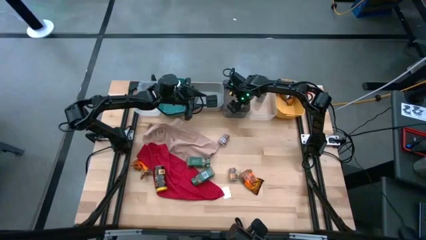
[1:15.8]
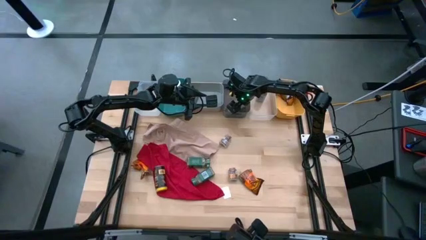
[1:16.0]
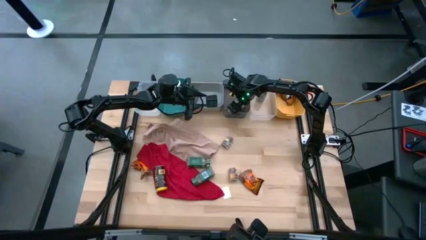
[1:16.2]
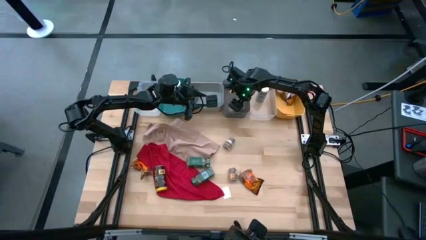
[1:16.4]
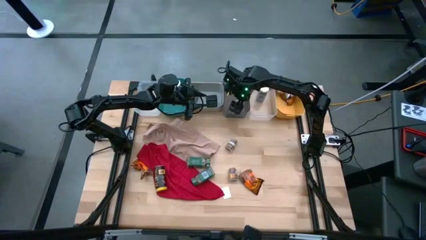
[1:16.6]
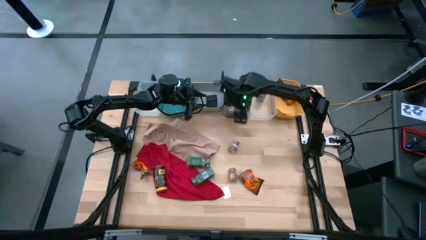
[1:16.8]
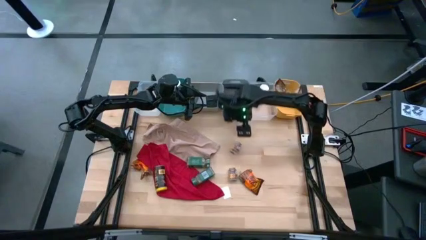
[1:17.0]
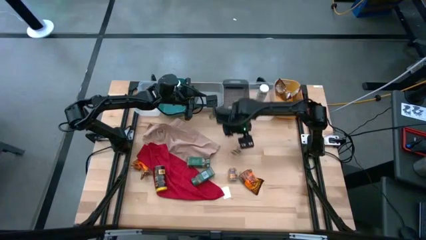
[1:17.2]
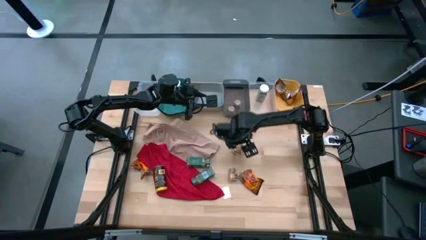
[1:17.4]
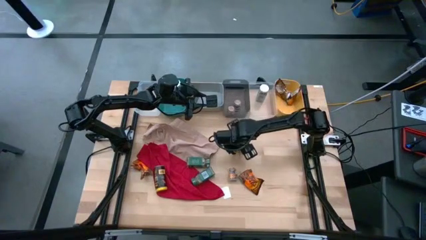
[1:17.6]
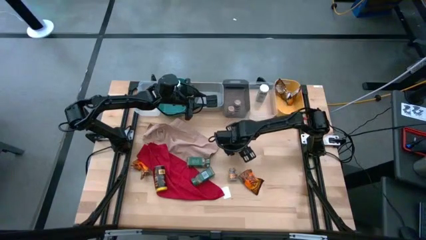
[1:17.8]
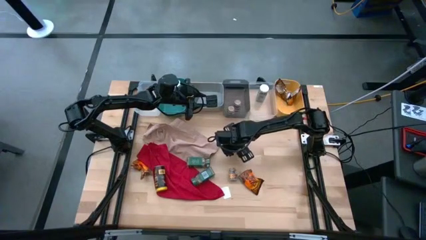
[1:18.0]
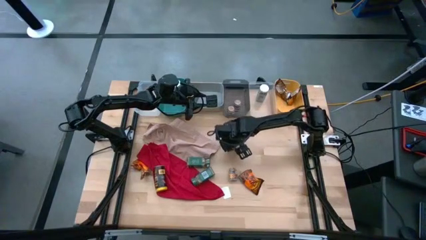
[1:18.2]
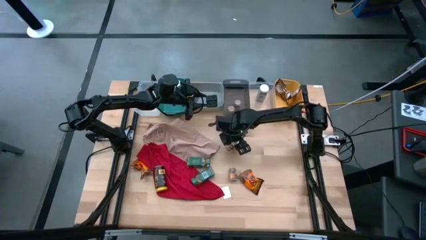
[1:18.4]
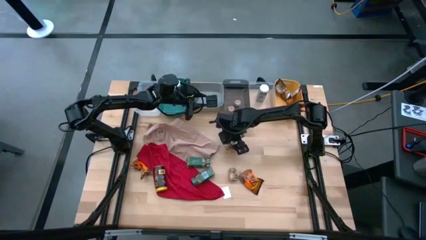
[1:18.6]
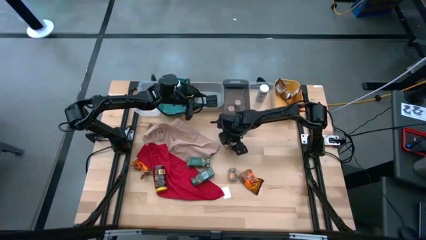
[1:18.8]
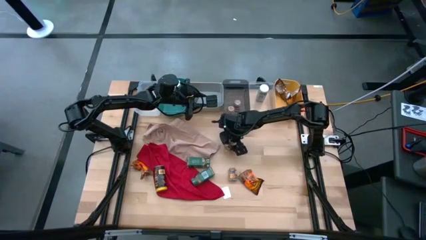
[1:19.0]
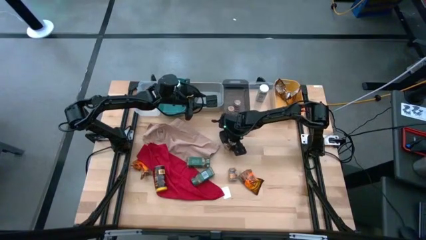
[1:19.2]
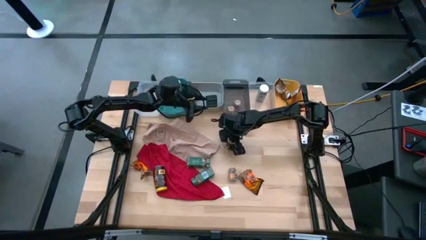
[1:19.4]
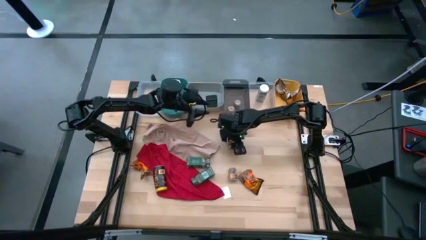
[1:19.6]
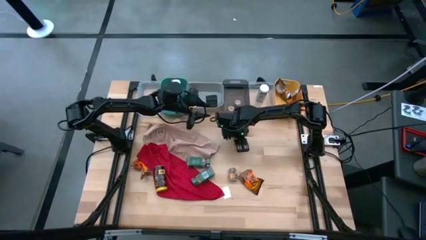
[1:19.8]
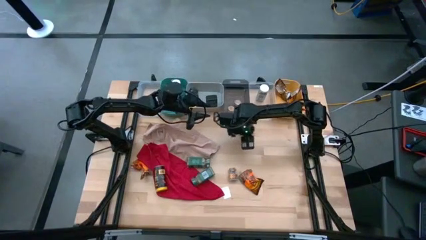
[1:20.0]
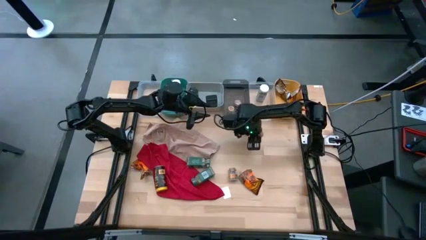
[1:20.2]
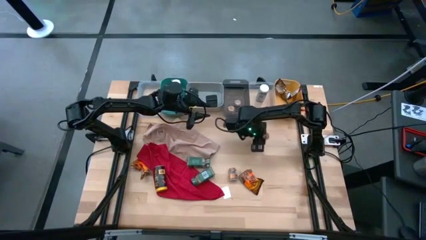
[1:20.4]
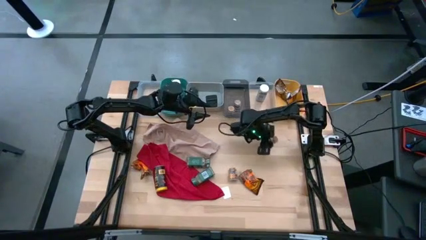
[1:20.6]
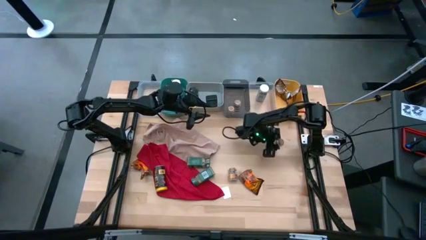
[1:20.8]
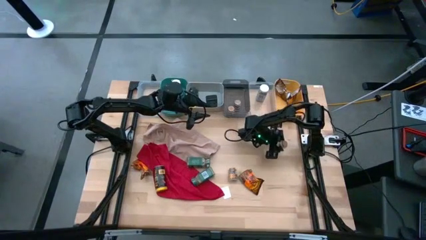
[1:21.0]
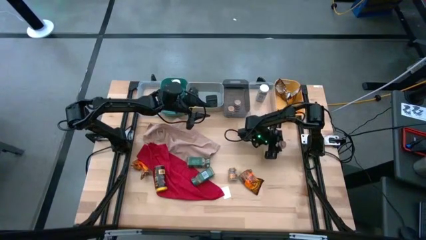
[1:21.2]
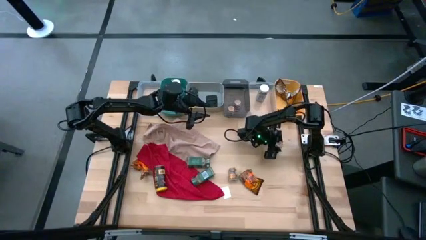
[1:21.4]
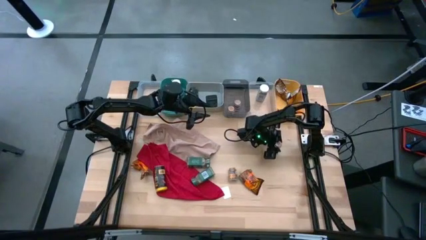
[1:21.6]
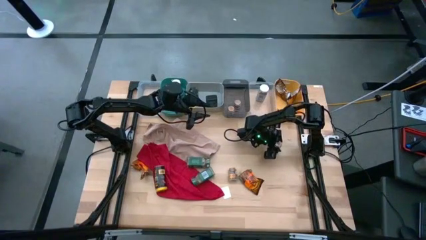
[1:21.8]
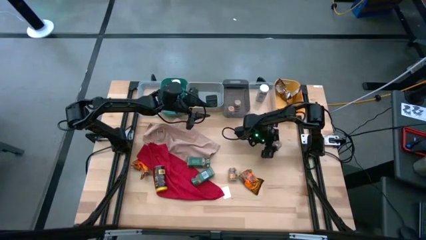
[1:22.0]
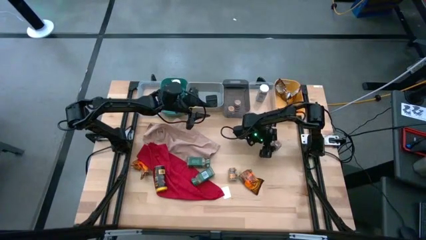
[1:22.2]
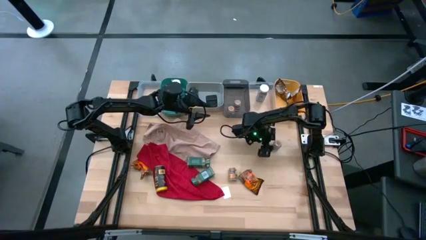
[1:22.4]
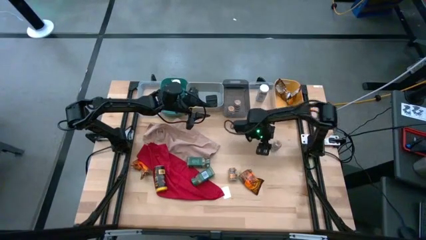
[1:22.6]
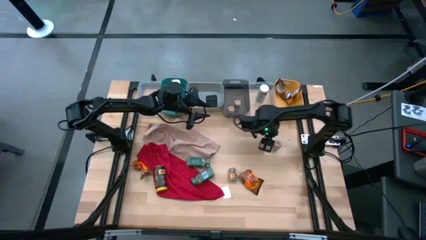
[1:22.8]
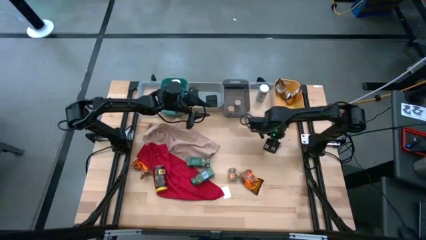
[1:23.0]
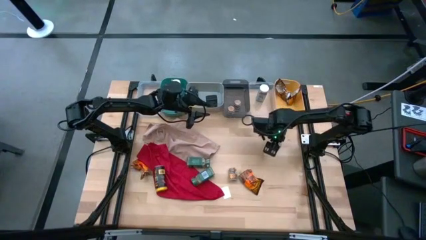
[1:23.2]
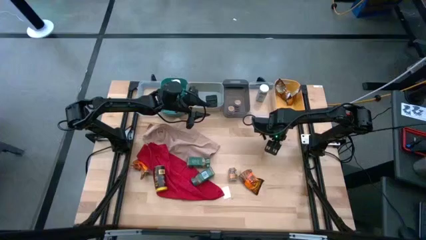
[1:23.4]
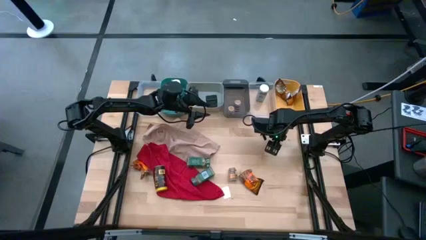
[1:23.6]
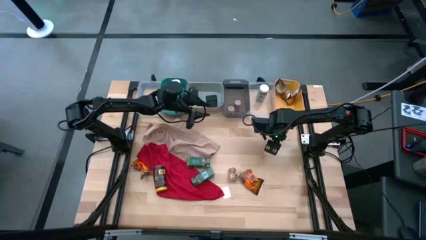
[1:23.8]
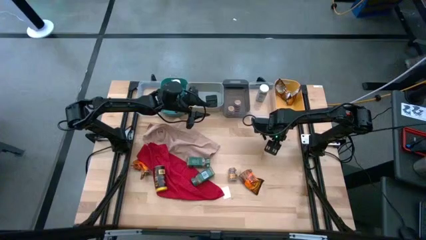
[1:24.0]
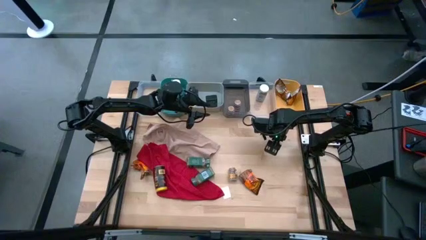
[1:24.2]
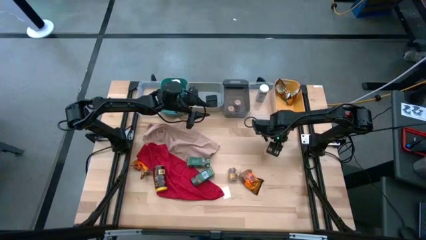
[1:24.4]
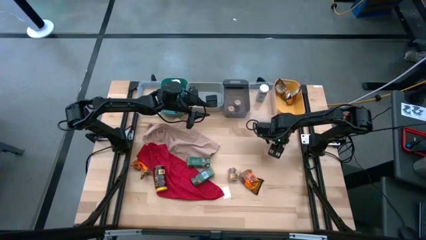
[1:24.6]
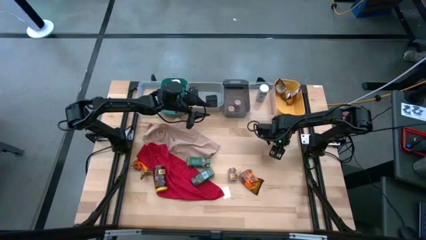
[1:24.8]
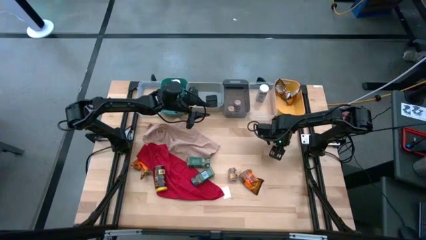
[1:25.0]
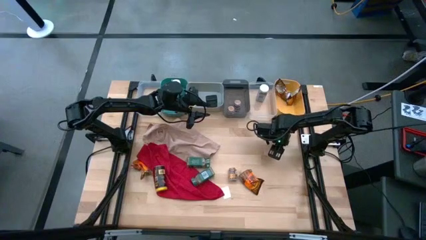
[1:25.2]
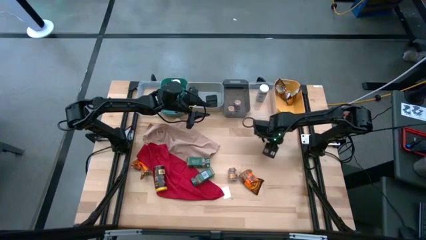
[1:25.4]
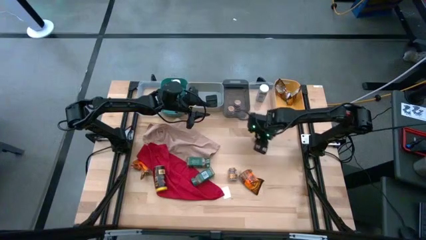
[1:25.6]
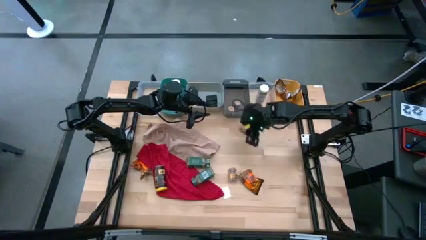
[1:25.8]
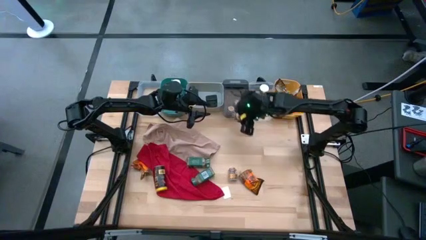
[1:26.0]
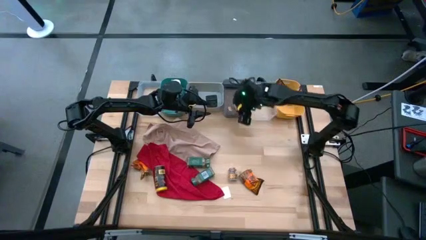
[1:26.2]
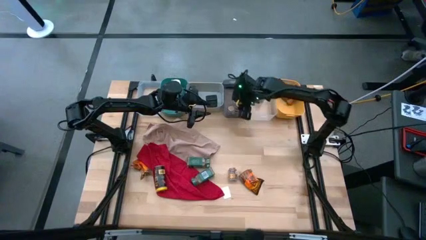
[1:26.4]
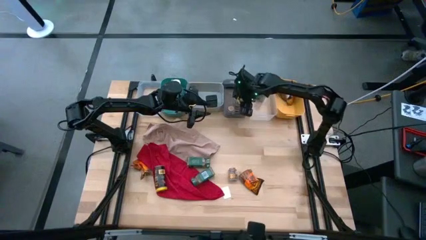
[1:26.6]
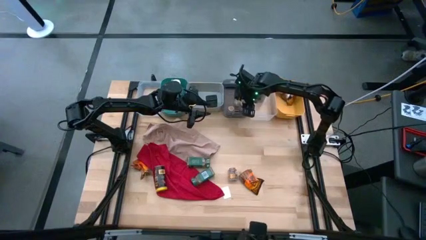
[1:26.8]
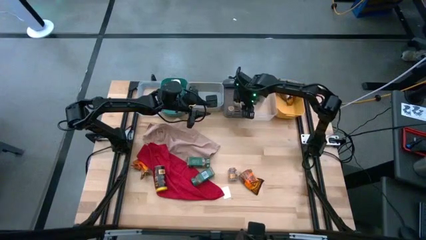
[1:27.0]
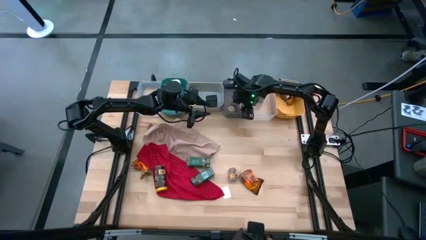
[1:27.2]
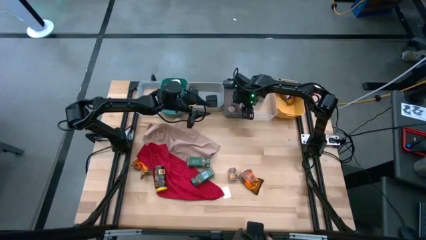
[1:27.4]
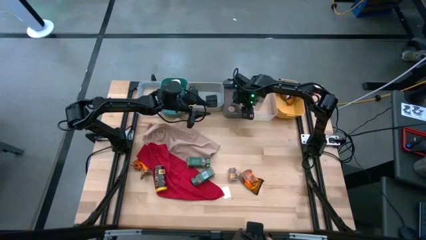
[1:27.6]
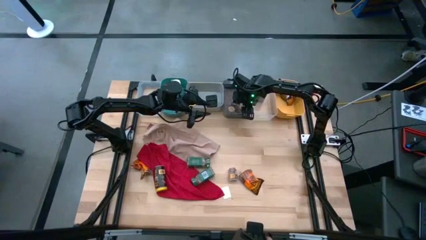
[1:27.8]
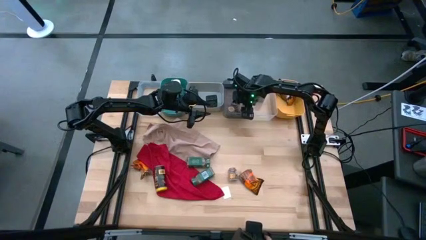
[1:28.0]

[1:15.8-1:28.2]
Task: Sort spices by type
Put the brown seasoning bottle into the black bin

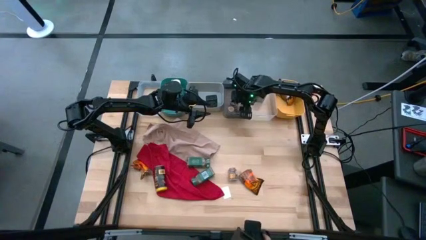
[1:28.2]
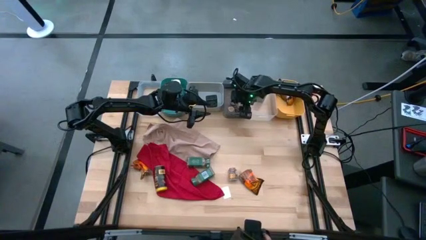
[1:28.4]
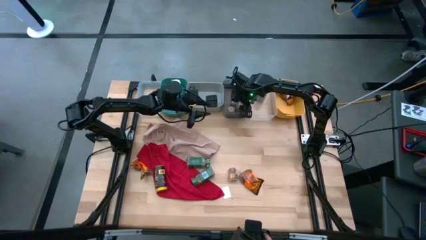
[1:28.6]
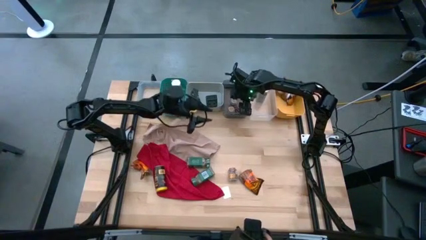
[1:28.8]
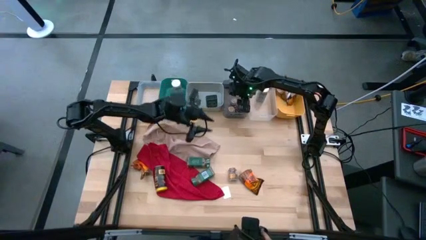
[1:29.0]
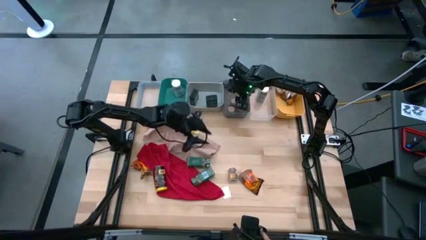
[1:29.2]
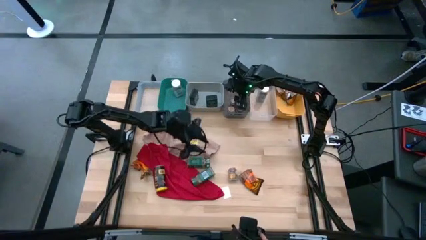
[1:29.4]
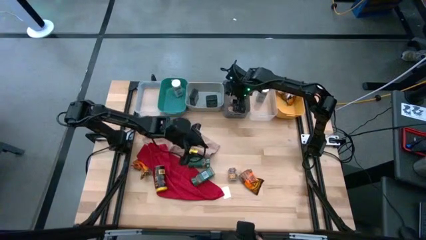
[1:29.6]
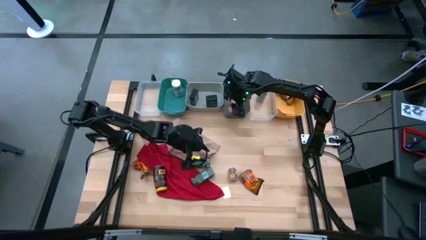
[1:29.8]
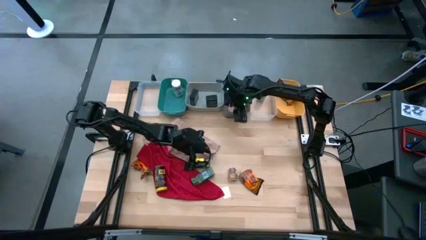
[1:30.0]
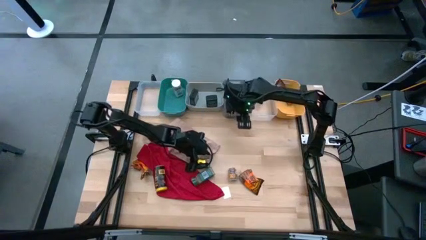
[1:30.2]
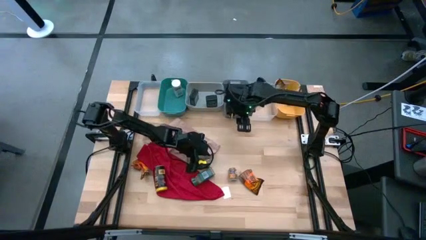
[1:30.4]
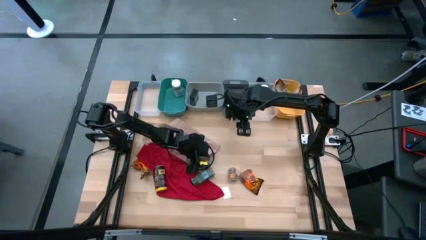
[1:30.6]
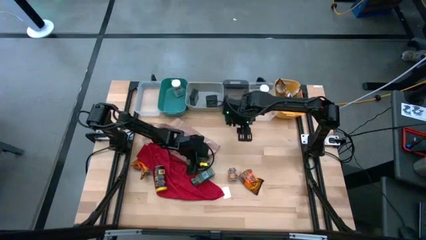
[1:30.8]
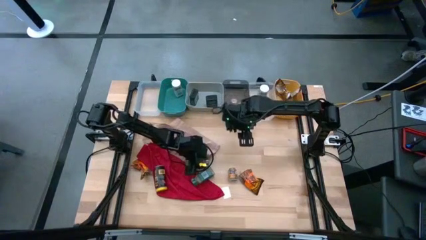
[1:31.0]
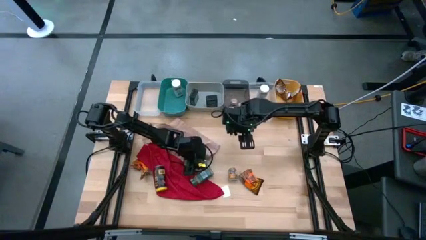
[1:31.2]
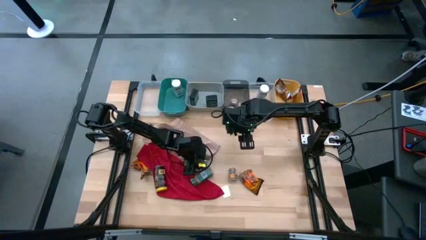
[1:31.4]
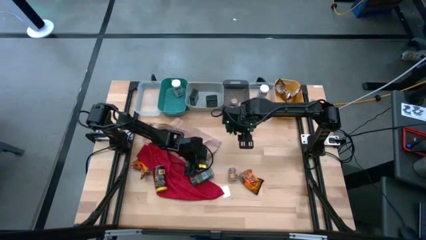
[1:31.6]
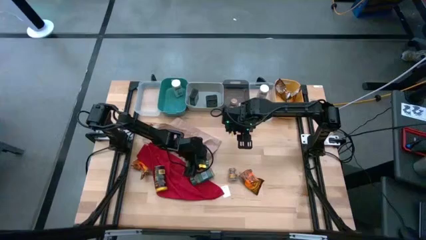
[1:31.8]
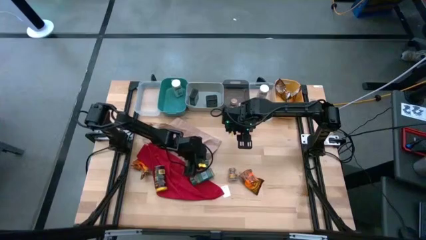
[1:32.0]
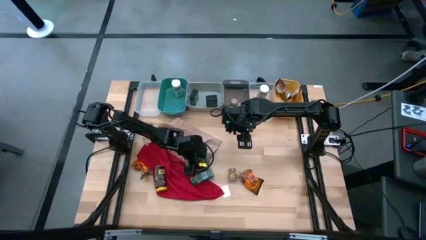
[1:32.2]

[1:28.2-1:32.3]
Put the green seasoning bottle into the blue transparent bin
